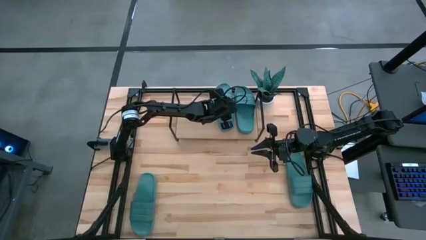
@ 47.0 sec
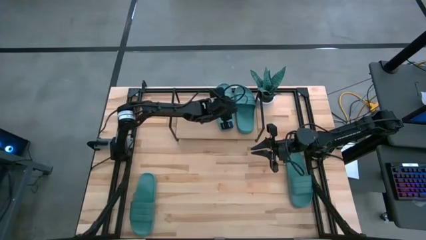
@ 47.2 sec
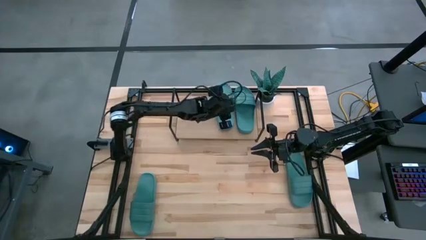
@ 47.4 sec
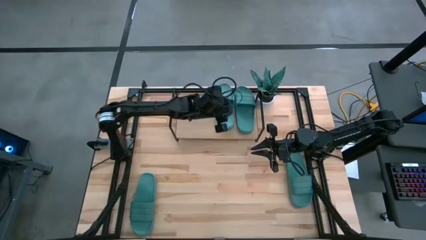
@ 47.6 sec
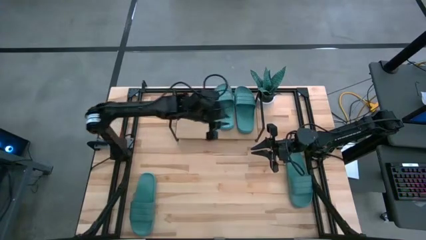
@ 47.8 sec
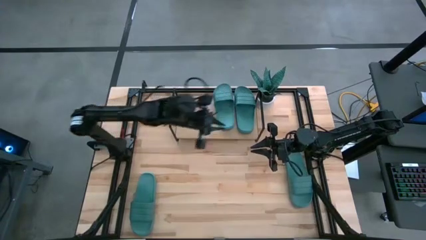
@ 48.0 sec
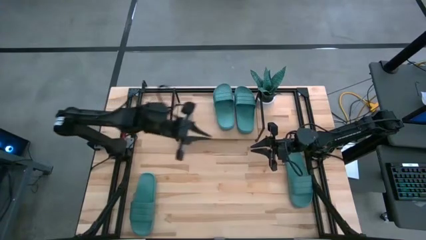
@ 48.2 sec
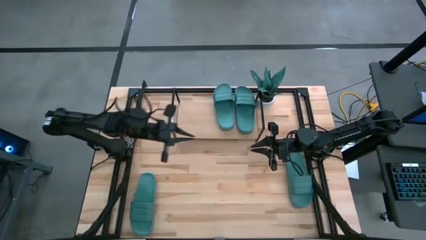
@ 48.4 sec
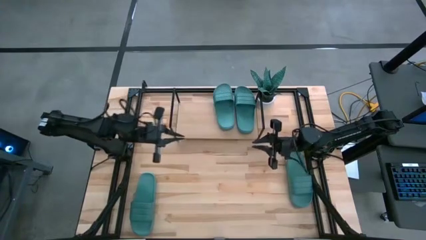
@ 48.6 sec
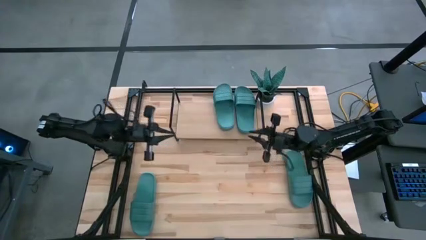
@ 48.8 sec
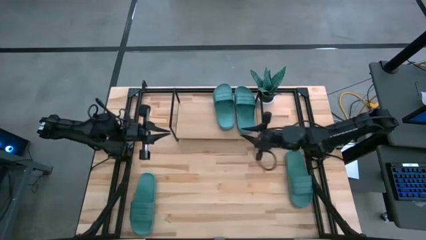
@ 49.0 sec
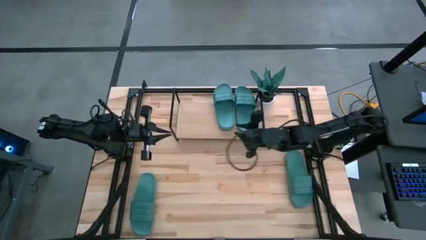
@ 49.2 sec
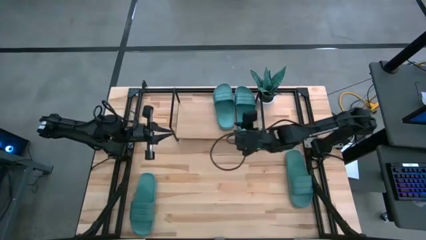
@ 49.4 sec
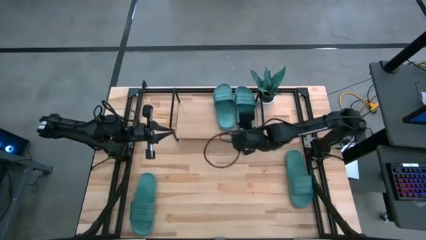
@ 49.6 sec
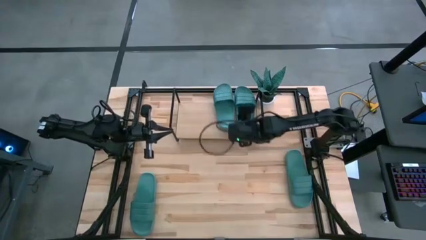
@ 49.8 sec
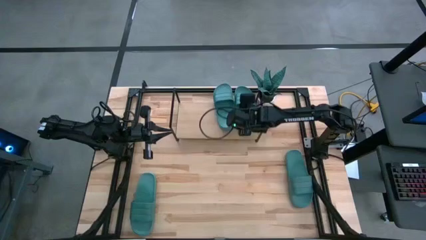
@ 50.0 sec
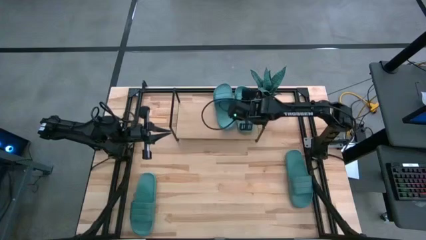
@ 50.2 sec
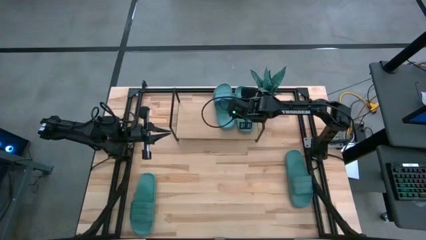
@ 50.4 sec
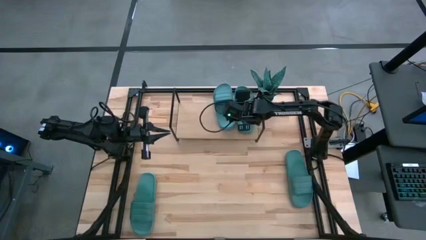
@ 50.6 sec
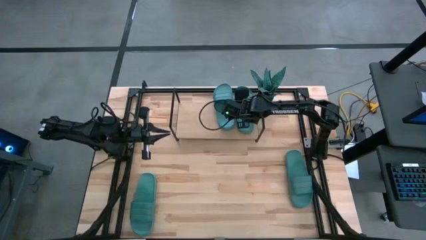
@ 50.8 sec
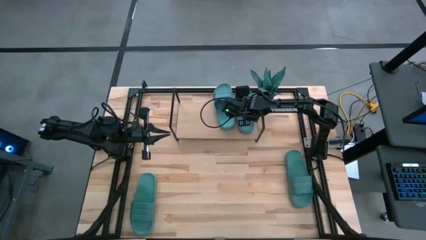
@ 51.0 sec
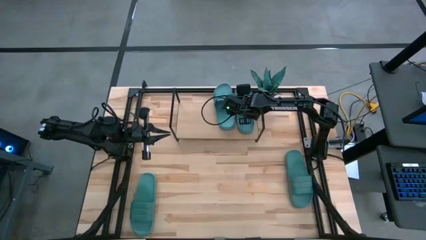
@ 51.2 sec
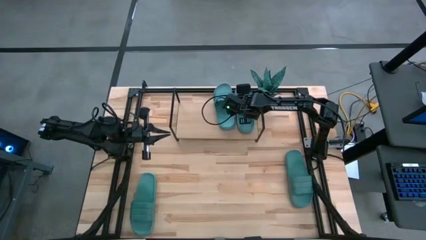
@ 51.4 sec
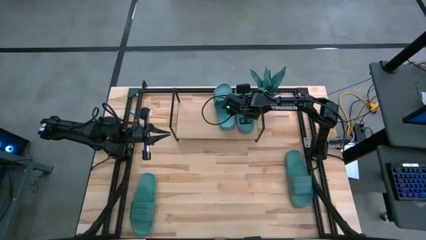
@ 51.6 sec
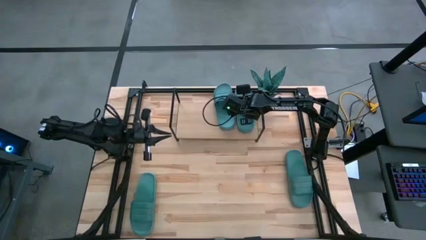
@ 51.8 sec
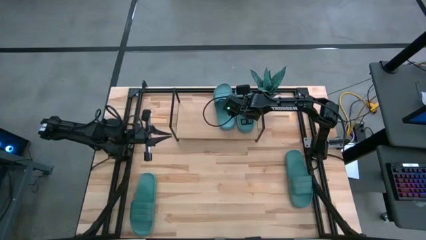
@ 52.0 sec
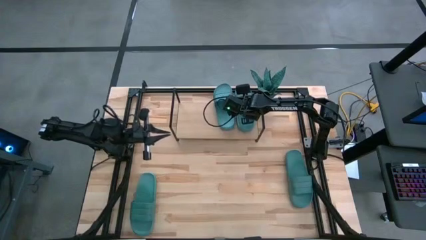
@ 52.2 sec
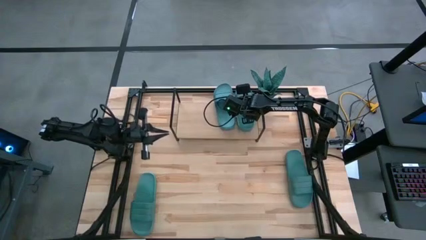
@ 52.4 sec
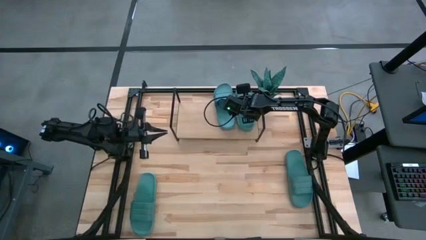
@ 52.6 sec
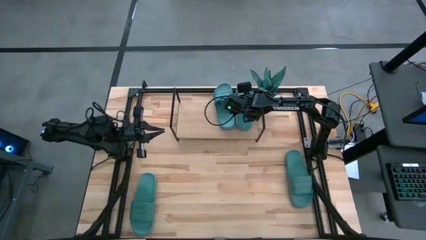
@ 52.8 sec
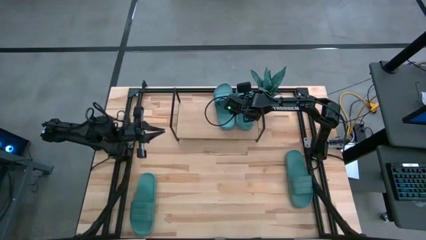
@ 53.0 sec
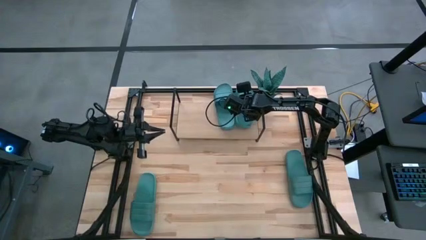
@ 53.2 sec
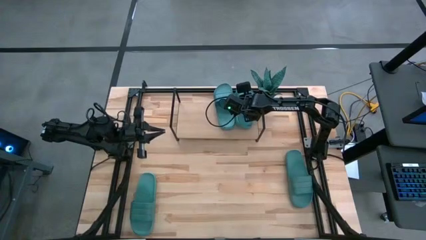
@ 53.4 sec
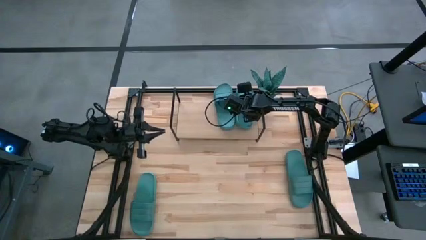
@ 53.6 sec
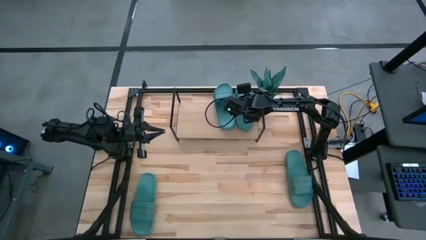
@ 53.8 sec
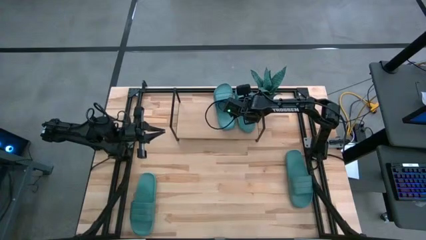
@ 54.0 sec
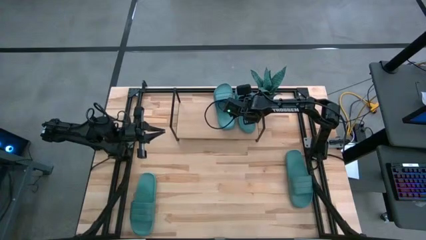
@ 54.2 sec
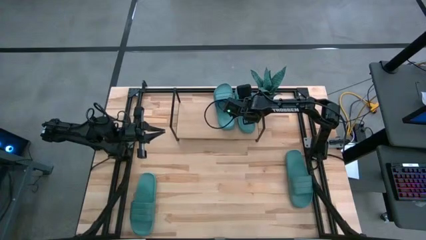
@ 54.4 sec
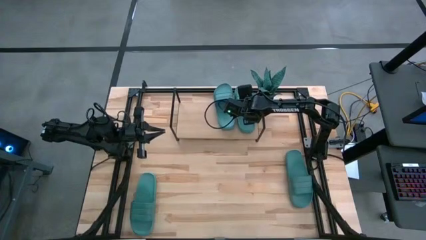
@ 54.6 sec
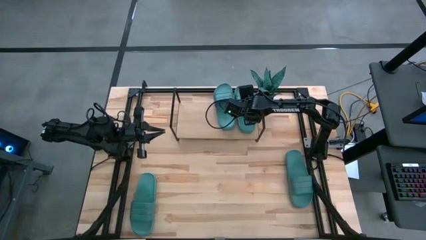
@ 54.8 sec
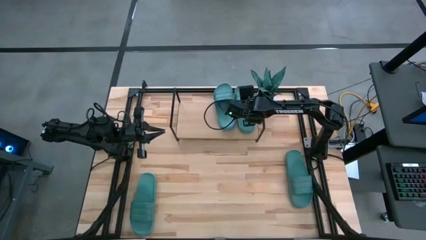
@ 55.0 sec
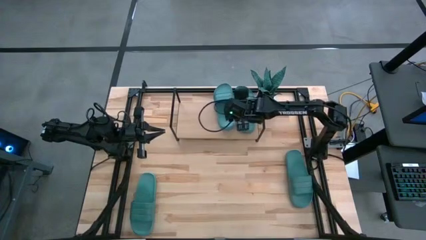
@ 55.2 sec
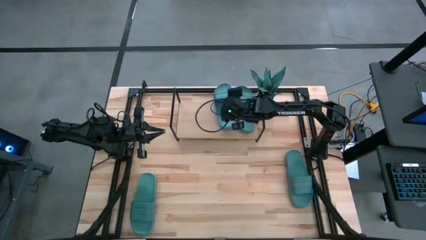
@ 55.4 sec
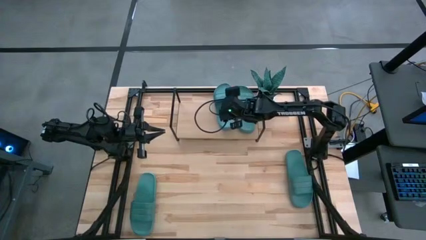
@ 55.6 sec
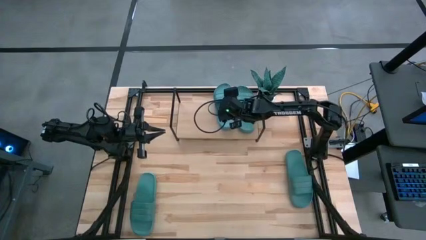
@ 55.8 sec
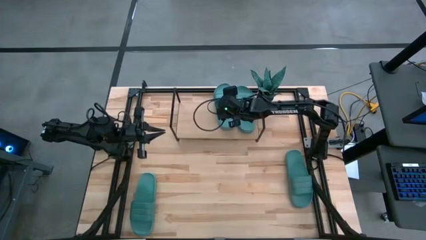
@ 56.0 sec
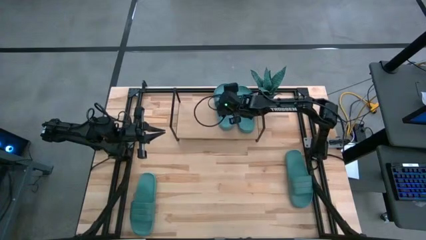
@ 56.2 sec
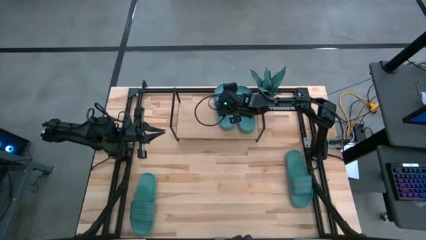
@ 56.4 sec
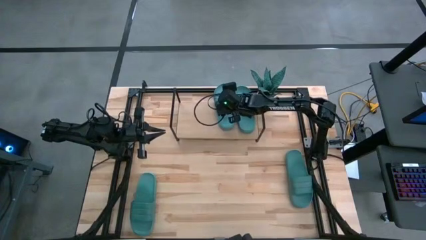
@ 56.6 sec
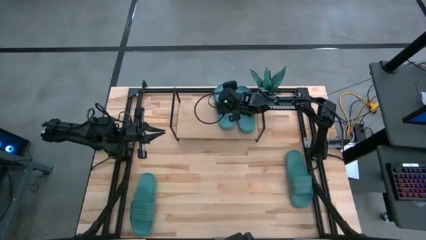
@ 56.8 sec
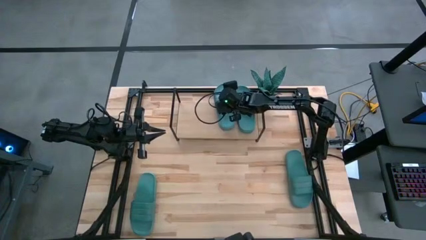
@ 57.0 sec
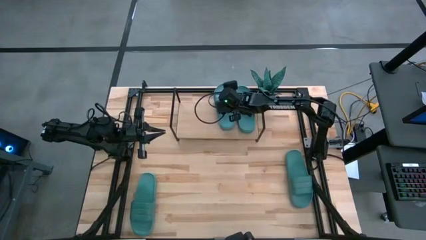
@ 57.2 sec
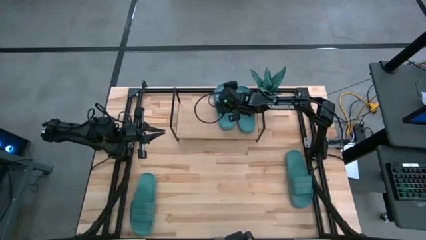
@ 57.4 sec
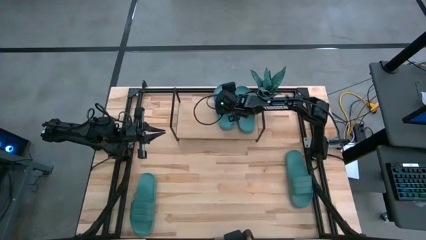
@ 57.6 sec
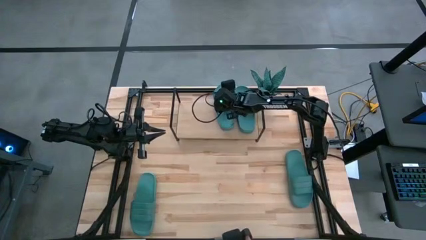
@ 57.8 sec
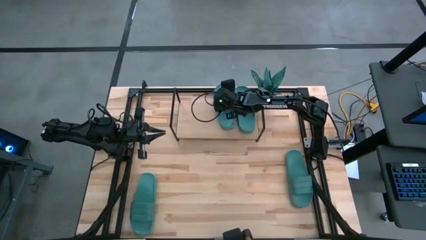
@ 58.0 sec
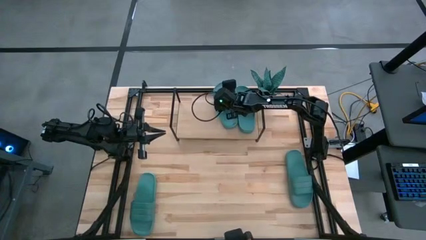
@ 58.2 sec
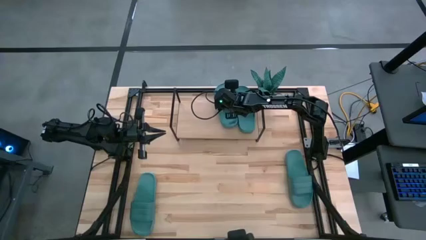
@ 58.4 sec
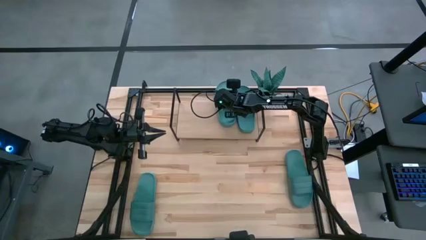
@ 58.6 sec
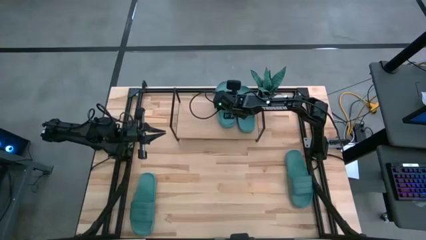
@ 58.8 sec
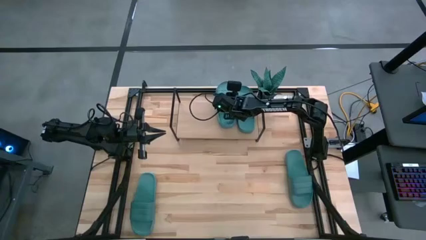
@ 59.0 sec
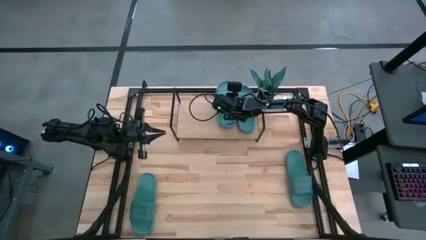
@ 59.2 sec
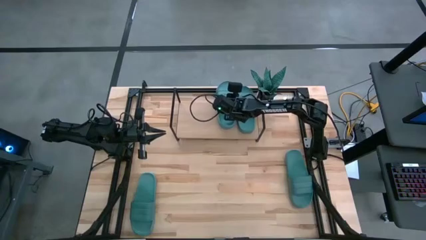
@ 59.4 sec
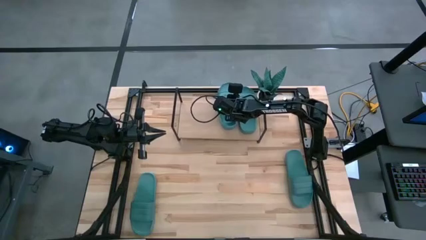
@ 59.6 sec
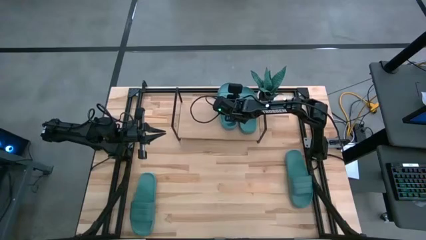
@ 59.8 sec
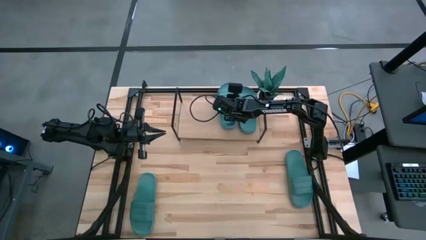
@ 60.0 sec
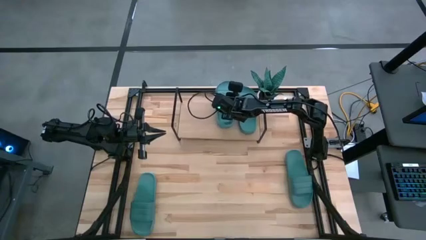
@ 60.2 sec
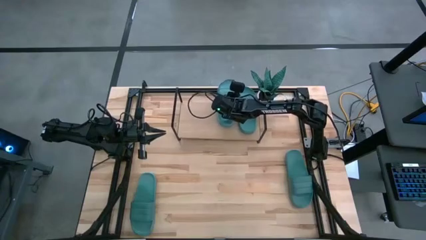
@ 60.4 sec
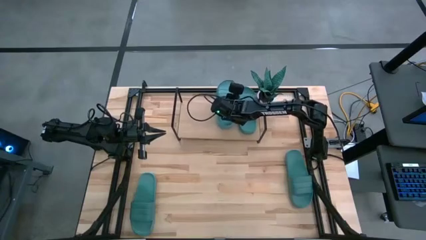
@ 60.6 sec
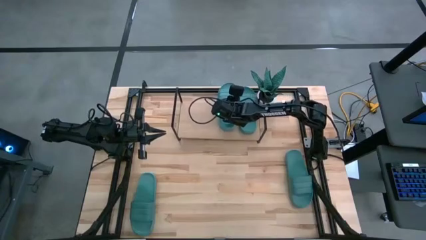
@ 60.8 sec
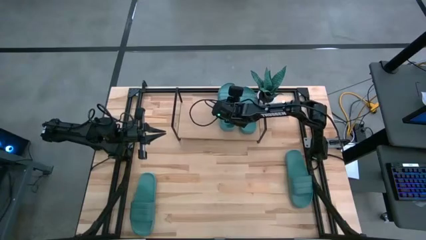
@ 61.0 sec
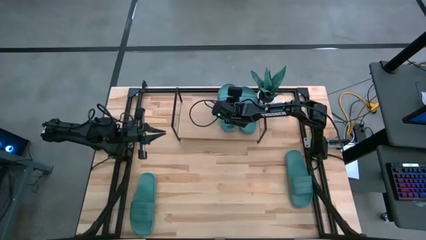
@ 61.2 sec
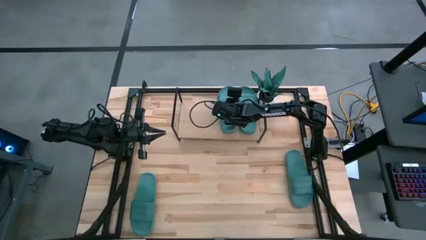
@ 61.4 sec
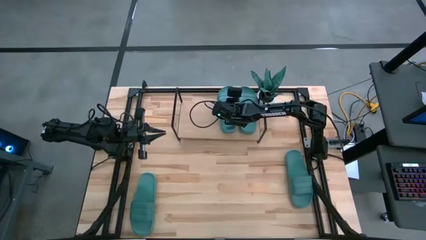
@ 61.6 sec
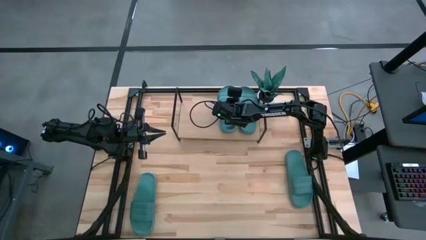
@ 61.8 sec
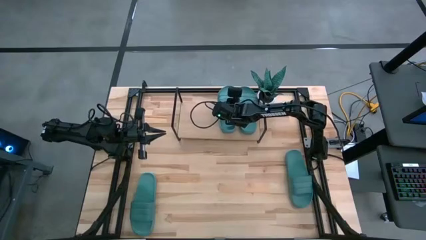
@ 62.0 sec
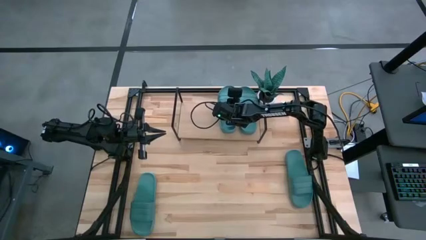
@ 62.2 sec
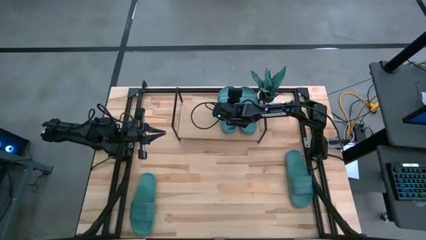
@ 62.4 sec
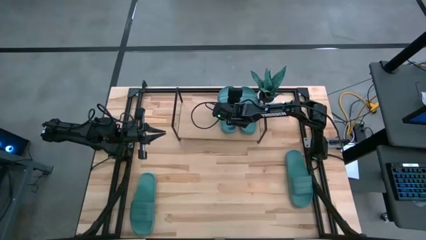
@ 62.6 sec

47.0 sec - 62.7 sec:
Task: Pick and place slides into the shelf
Adjust the green slippers on the shelf
